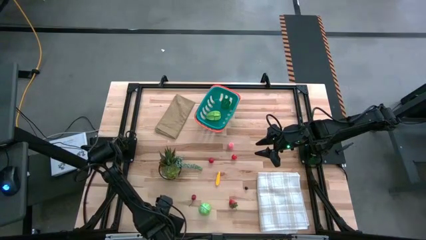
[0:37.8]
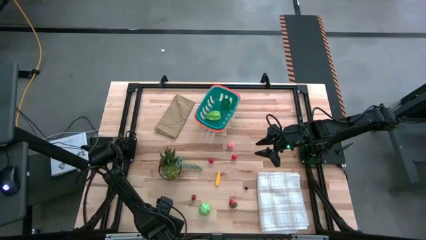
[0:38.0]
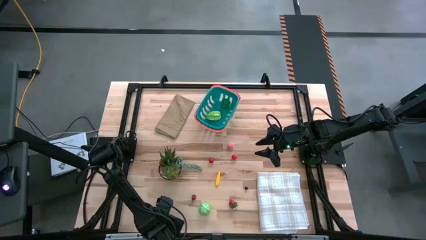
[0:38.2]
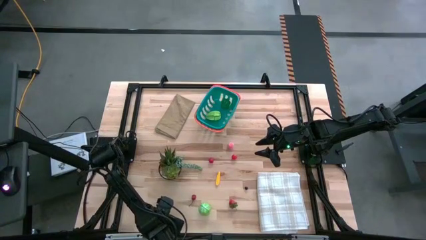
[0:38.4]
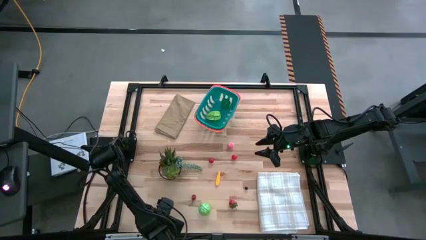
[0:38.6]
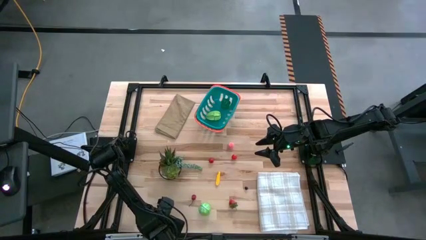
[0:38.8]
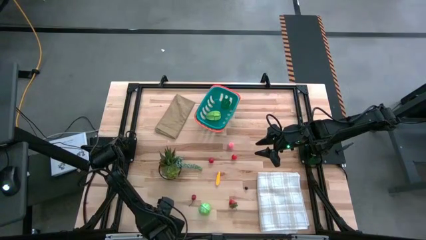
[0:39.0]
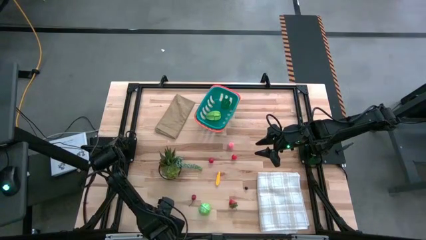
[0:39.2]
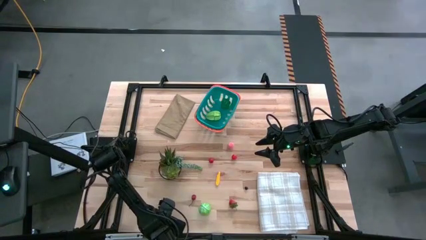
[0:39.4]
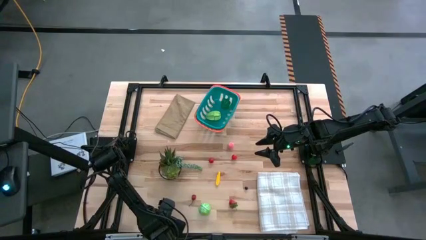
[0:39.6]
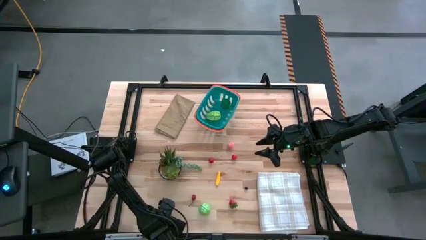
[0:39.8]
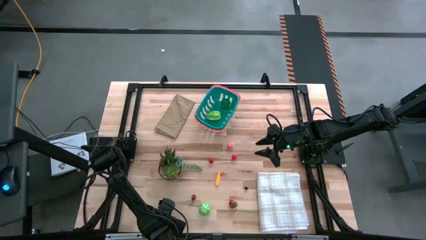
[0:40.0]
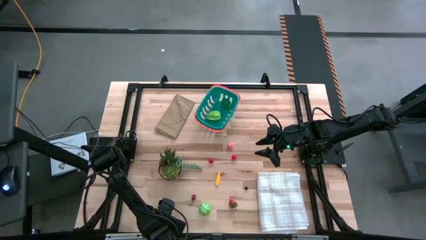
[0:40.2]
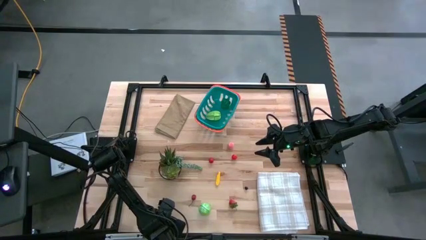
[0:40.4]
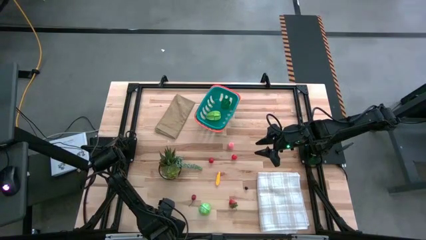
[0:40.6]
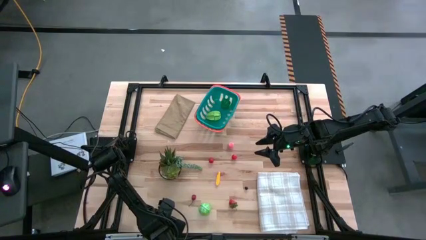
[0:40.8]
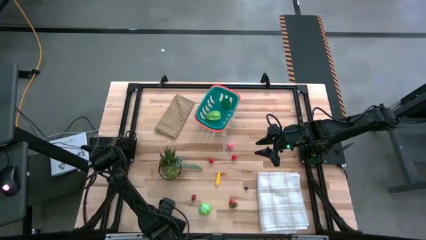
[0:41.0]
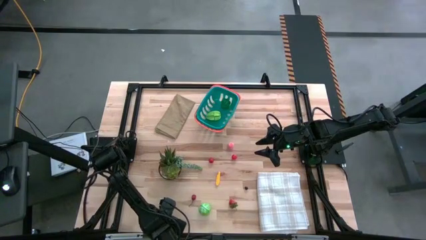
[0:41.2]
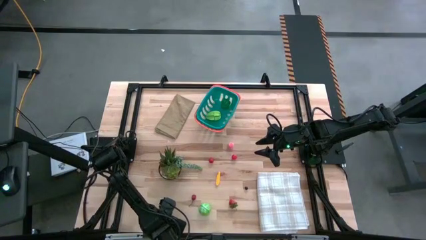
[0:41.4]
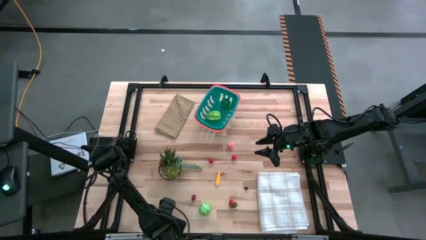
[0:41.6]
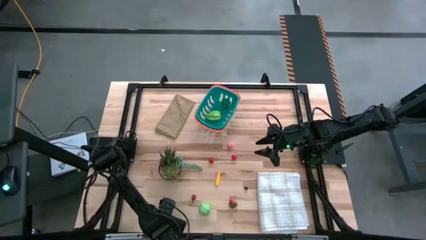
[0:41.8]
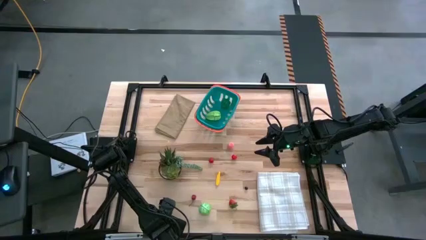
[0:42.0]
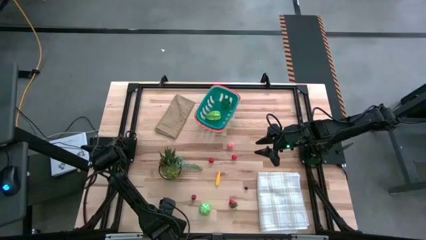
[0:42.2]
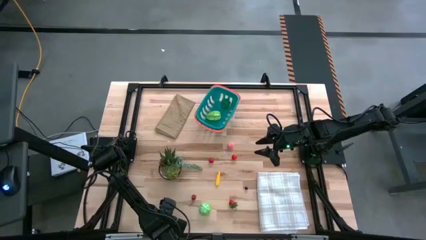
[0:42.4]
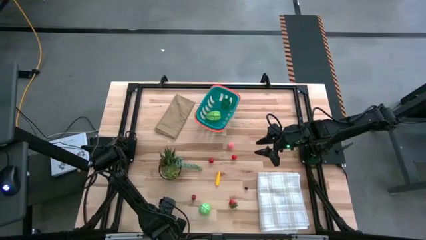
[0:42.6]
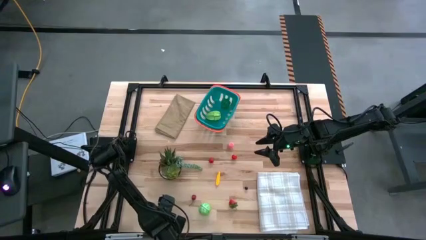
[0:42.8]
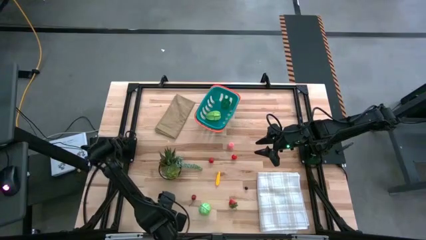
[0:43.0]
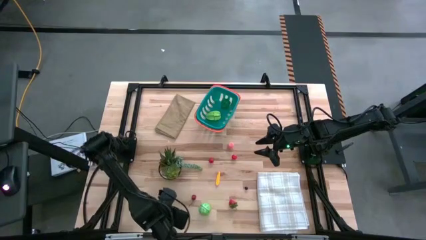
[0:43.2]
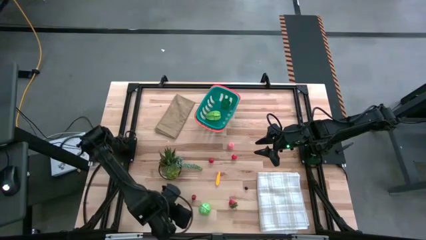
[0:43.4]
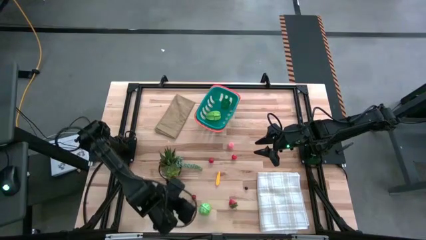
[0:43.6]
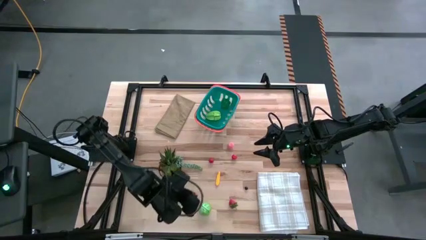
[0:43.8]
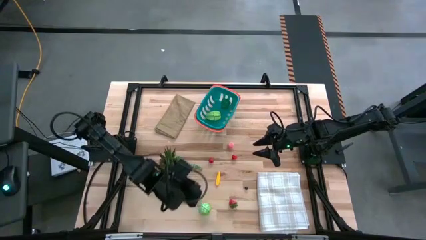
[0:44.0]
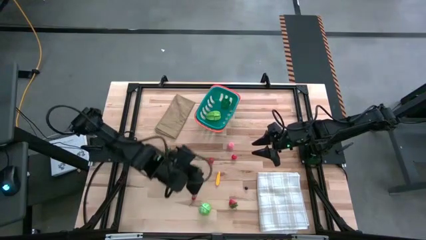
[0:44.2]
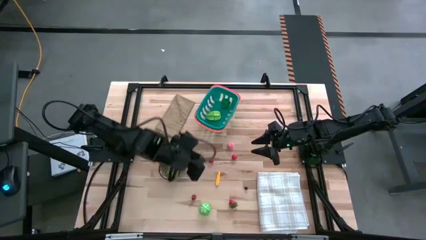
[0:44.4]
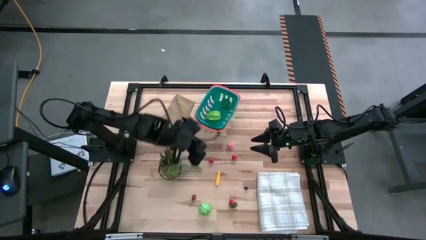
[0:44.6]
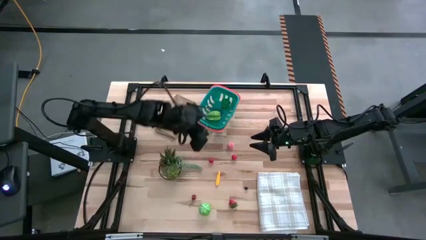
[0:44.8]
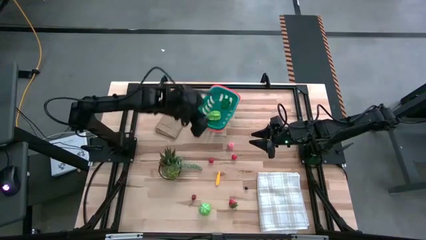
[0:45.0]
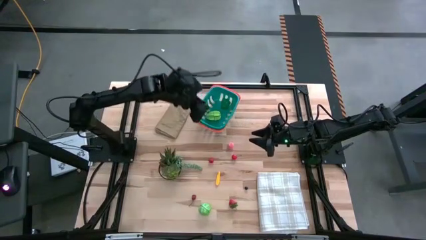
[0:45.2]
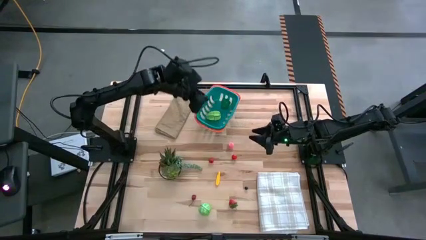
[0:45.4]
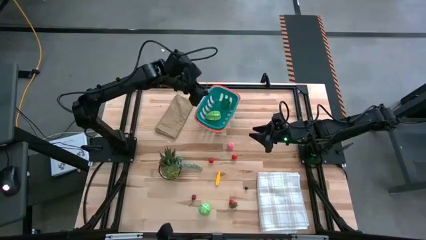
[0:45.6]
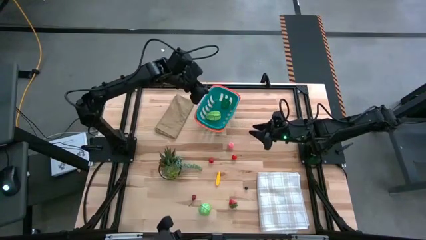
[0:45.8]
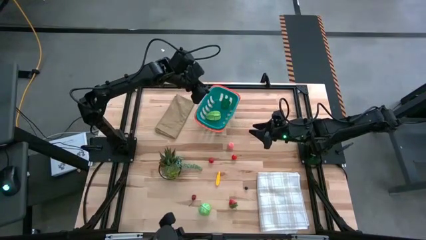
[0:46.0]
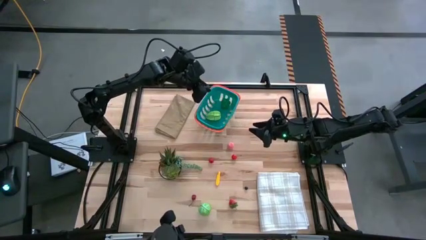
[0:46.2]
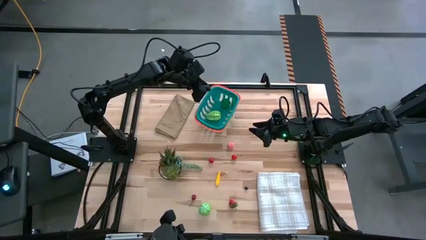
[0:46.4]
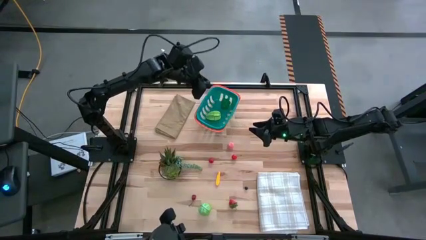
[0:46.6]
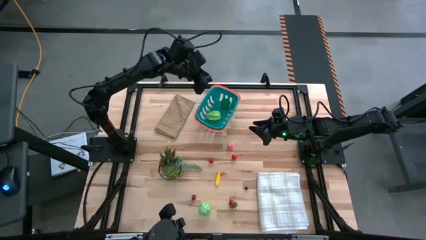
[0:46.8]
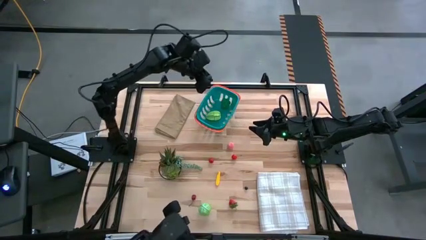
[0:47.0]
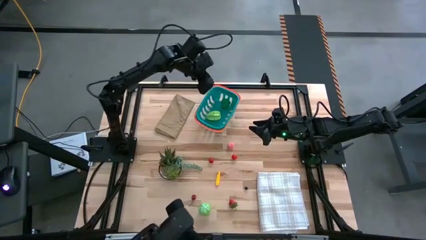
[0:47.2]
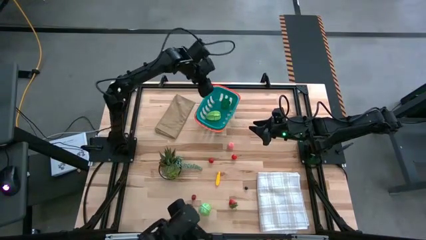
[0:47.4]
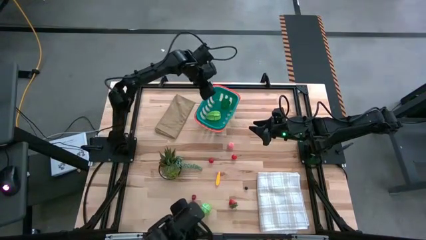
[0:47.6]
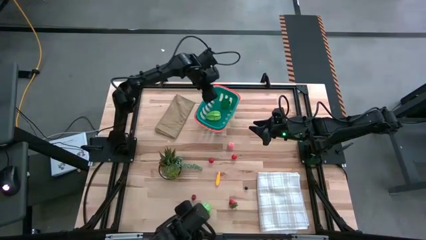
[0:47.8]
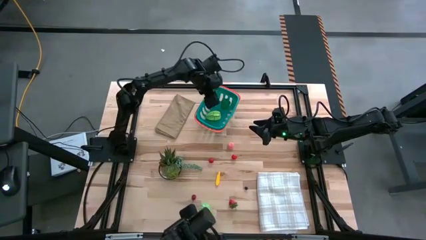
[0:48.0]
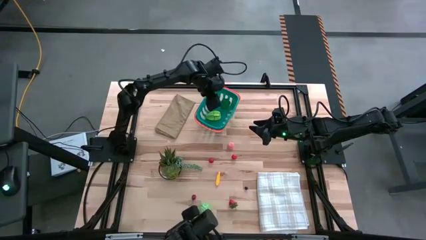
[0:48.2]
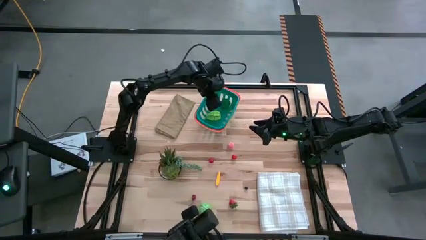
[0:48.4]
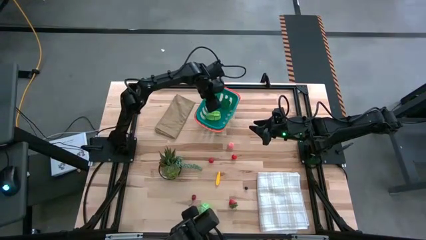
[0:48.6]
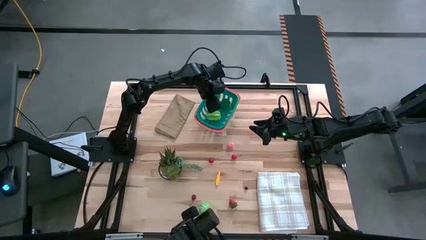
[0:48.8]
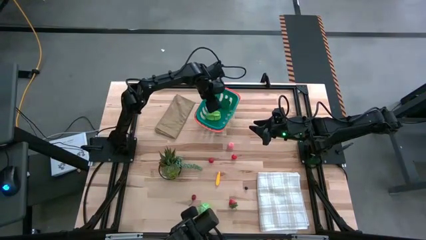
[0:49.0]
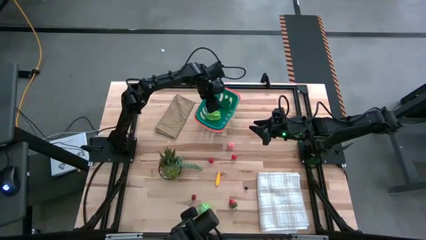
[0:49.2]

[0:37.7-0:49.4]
Task: Pick and placing Produce into tupperware
Put the left black cherry in the green basket
